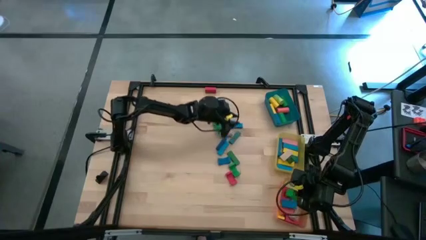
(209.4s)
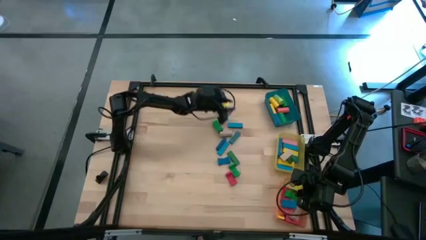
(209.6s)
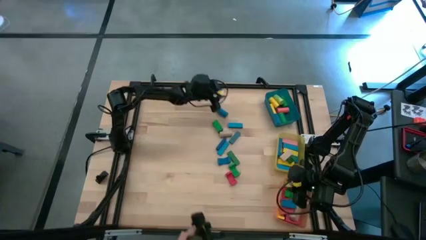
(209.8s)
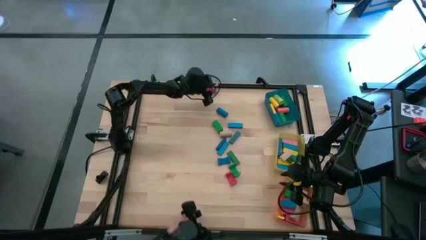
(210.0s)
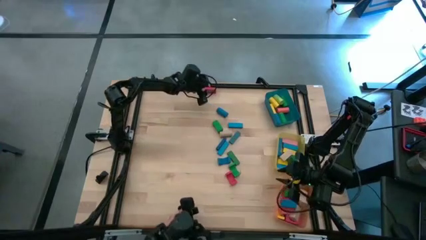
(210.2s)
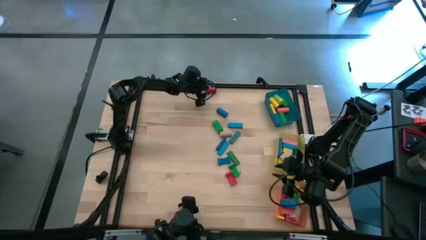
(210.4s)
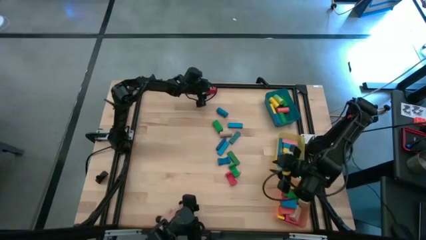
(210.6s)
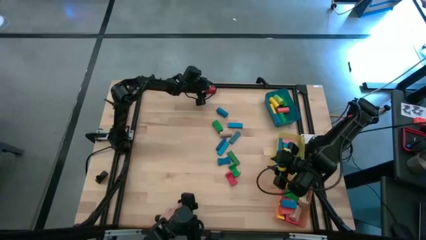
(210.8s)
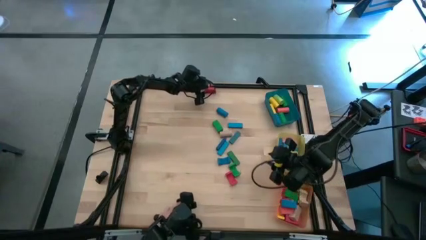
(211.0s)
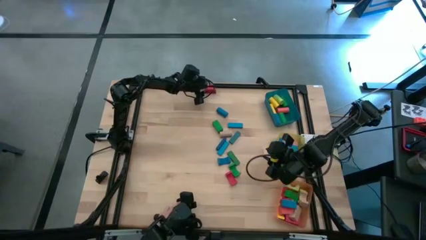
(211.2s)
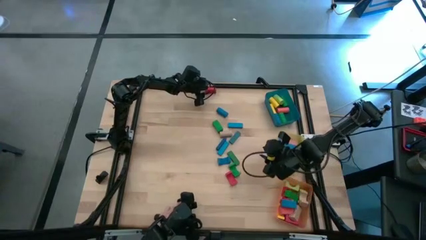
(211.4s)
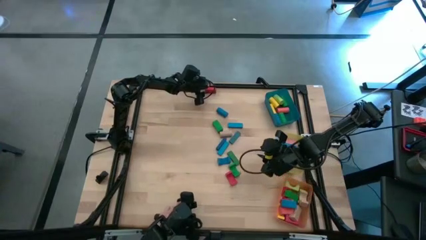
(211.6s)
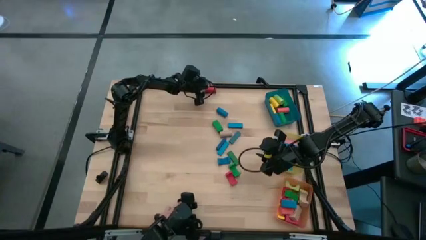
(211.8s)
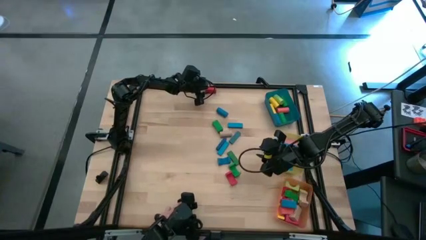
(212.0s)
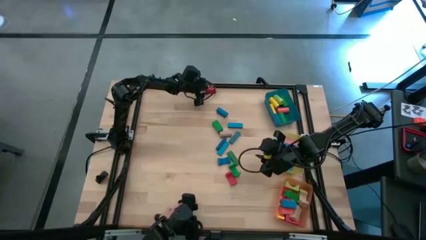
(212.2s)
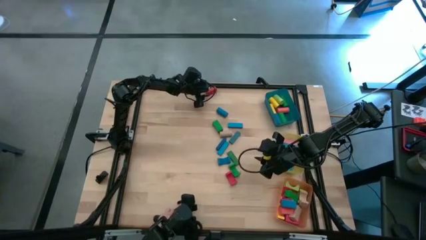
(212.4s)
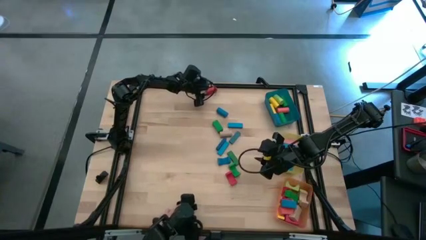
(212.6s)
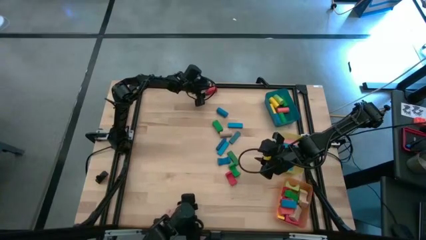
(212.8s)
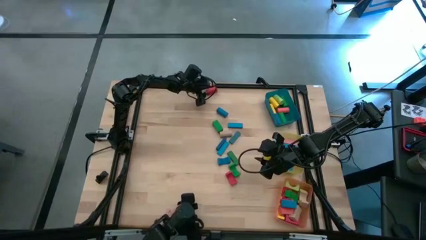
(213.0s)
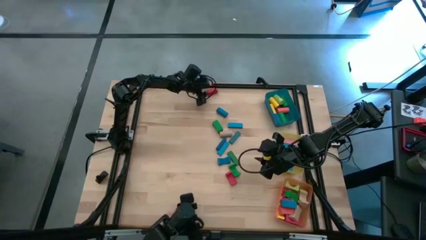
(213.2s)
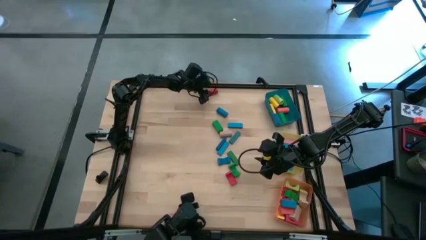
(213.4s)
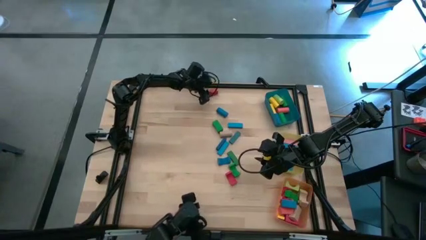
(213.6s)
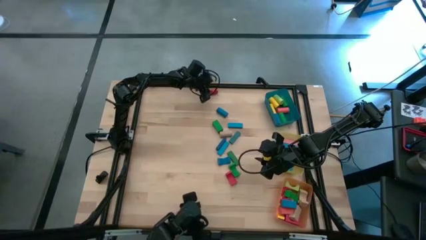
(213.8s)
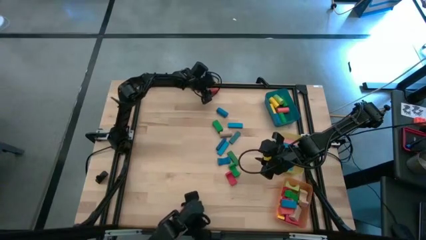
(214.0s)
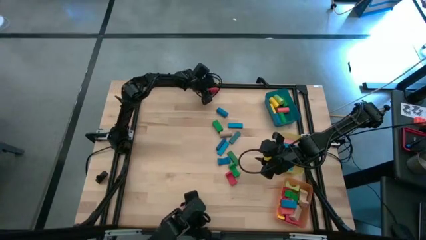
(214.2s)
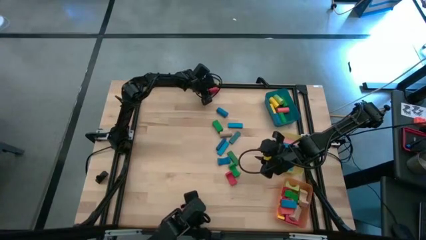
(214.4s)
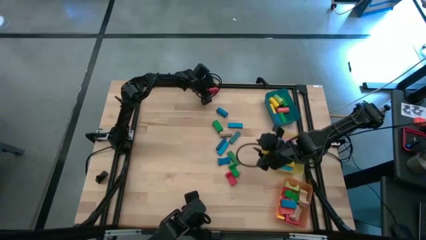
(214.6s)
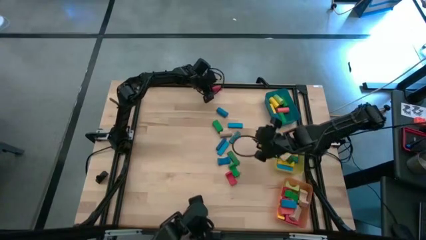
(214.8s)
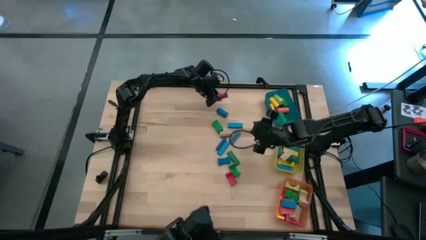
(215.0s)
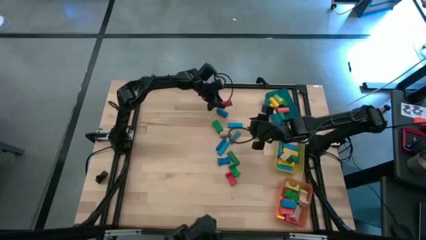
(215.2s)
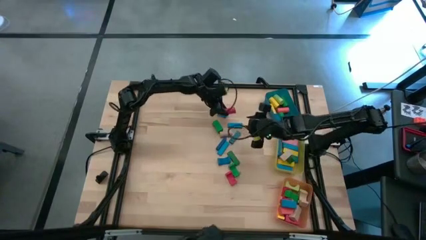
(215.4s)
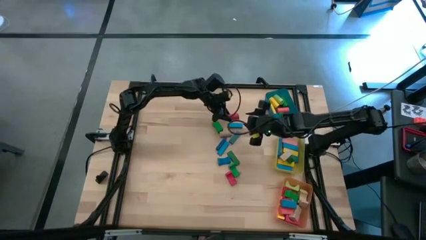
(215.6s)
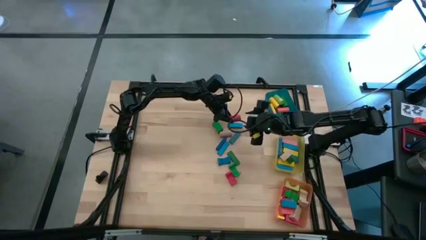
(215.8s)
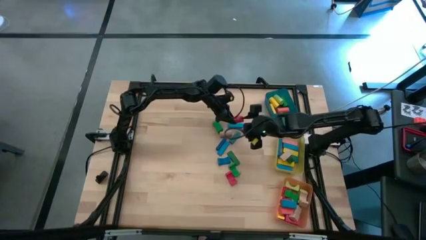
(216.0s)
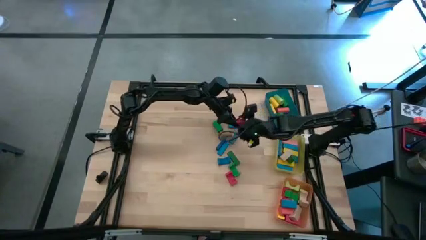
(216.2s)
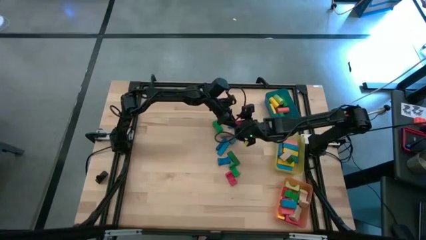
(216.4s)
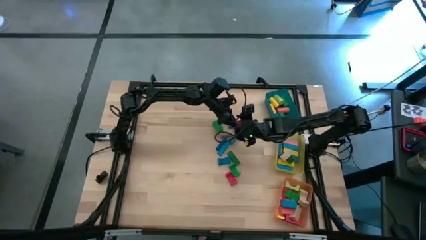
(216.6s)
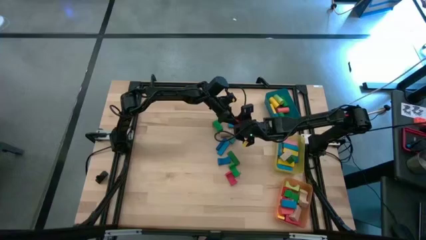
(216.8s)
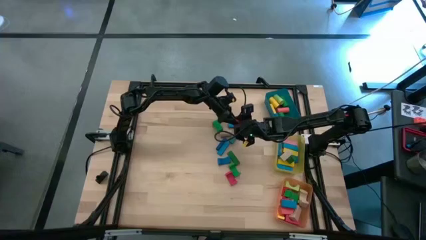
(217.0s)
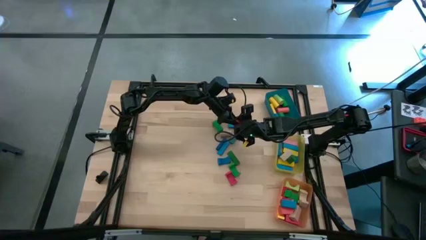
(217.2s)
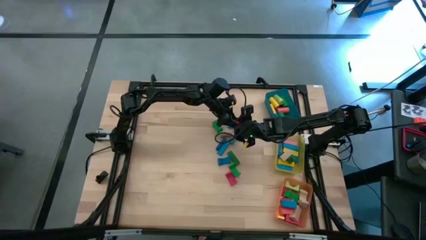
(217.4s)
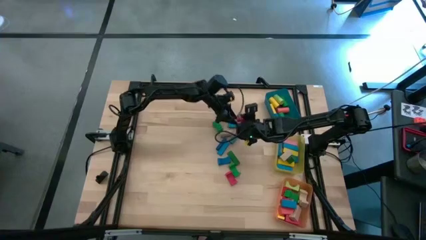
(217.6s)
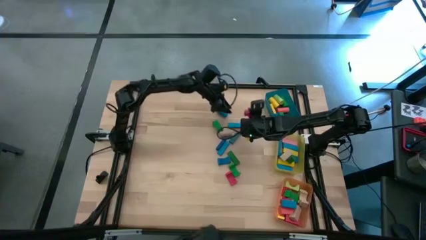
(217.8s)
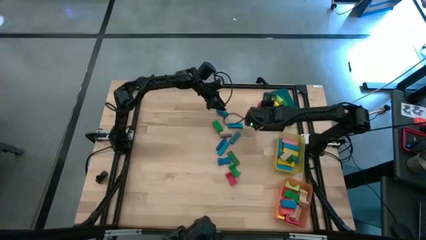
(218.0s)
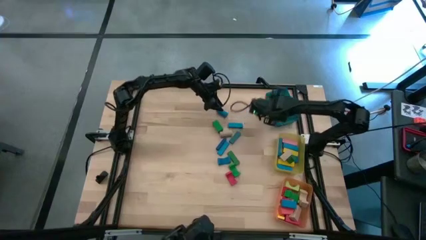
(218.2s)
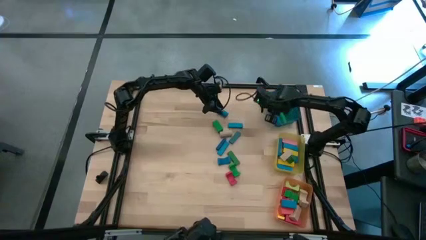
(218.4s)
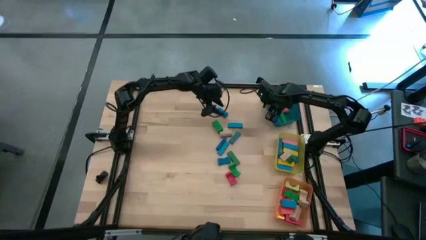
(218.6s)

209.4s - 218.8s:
Task: Sort blocks by size
Put the red cylindrical block into the blue bin

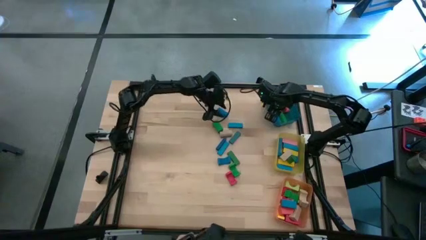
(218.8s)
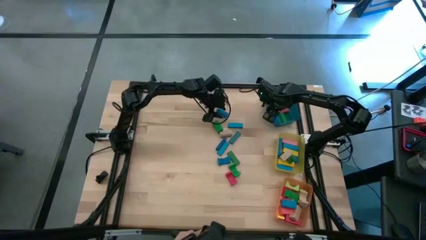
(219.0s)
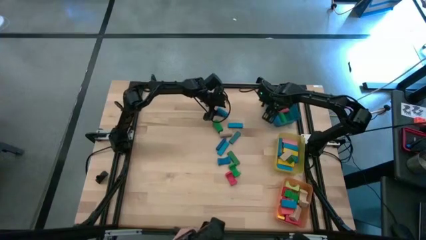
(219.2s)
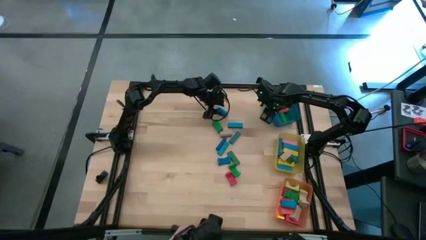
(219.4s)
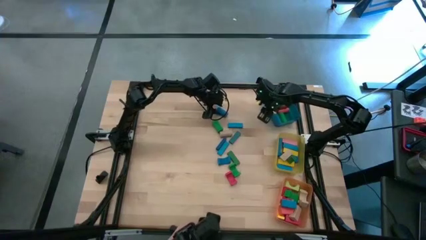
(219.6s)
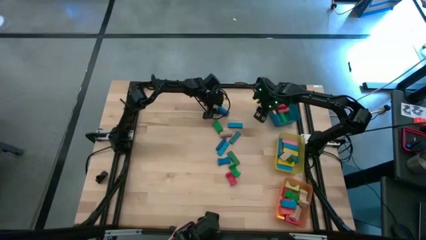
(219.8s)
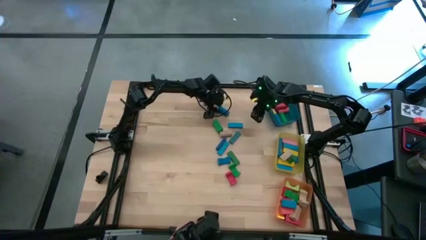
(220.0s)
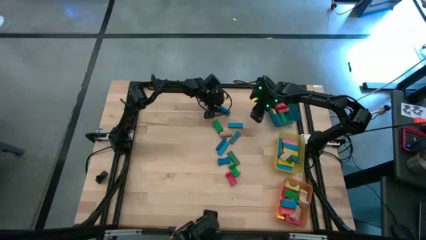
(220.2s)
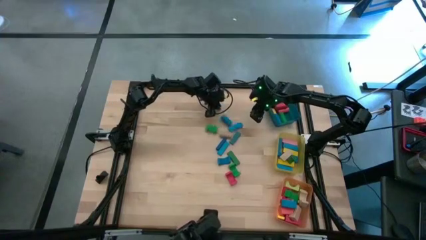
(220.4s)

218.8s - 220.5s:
Put the blue cylindrical block into the blue bin

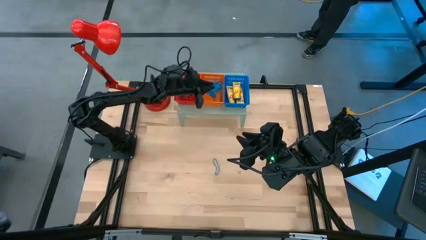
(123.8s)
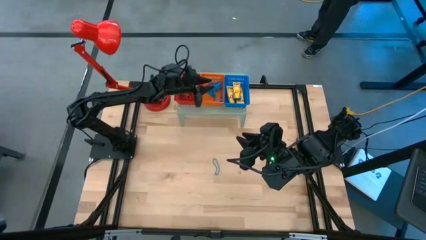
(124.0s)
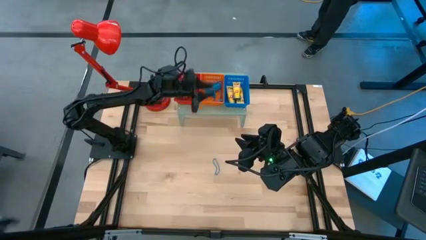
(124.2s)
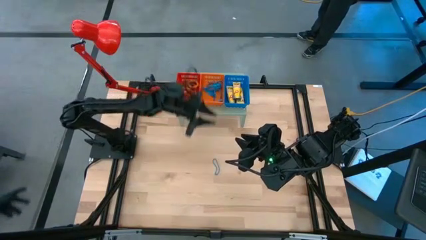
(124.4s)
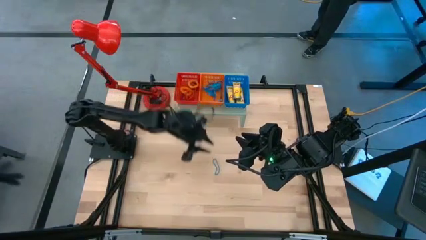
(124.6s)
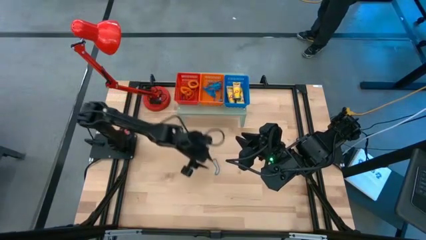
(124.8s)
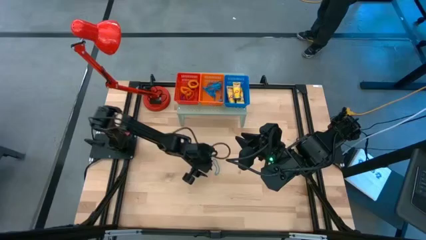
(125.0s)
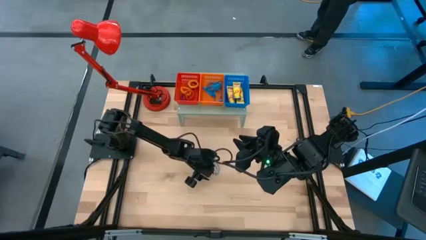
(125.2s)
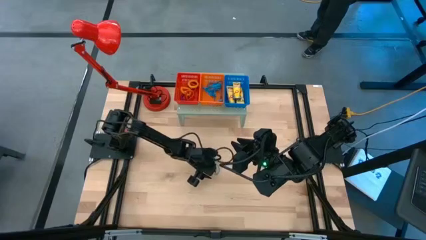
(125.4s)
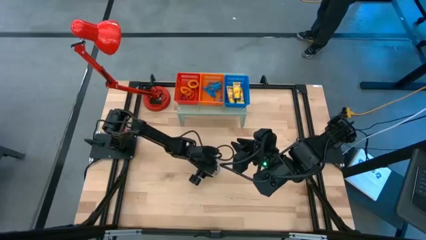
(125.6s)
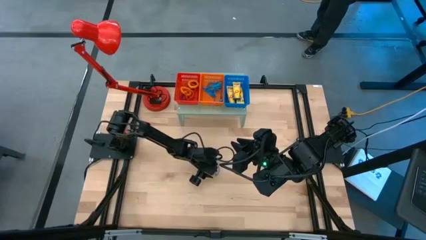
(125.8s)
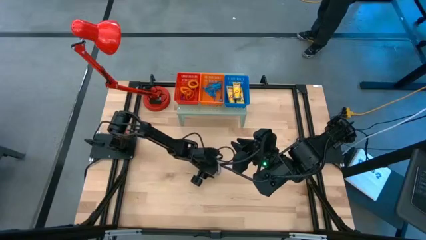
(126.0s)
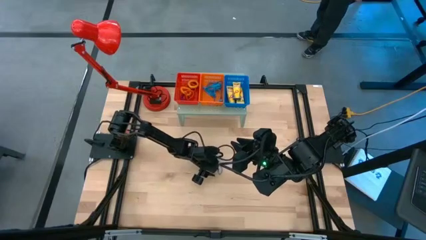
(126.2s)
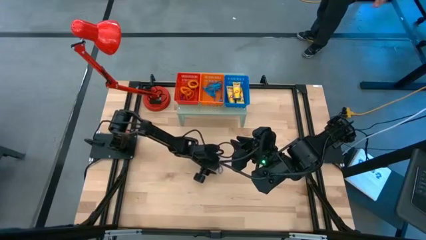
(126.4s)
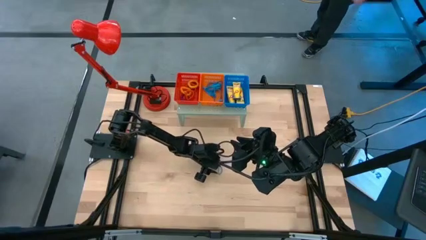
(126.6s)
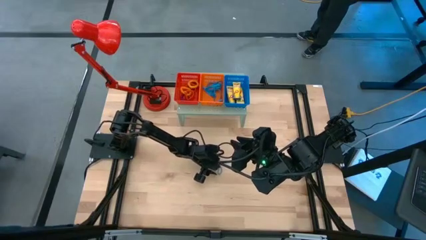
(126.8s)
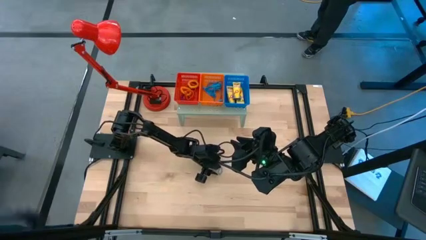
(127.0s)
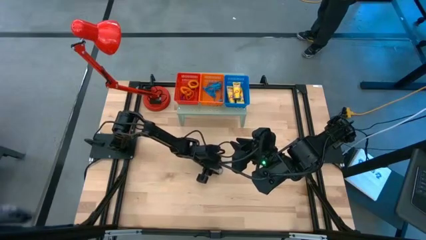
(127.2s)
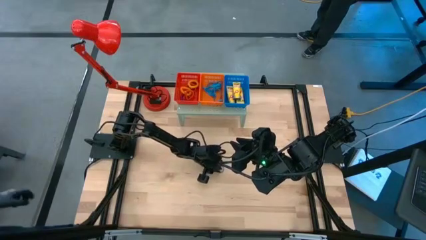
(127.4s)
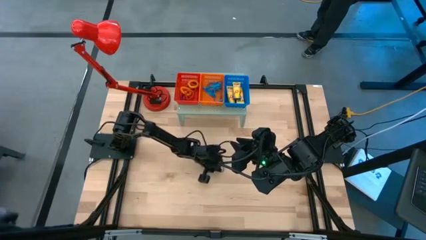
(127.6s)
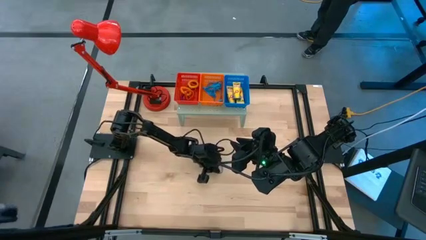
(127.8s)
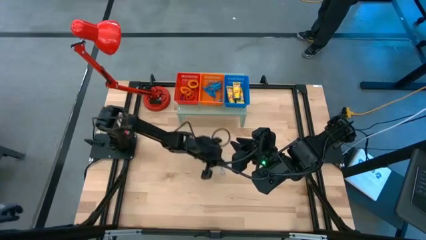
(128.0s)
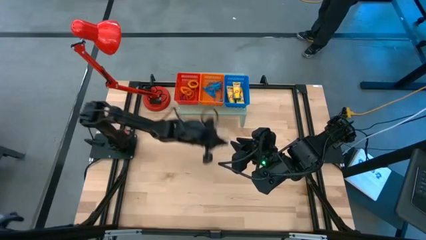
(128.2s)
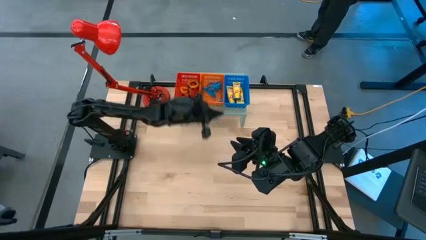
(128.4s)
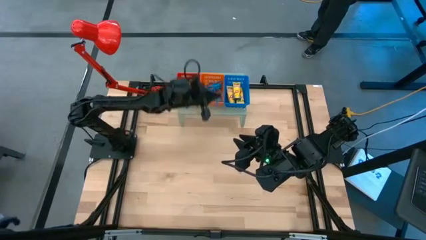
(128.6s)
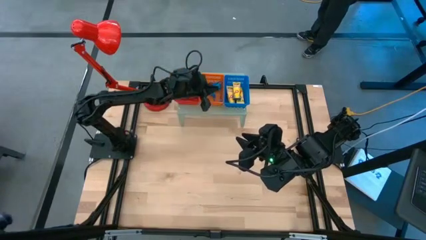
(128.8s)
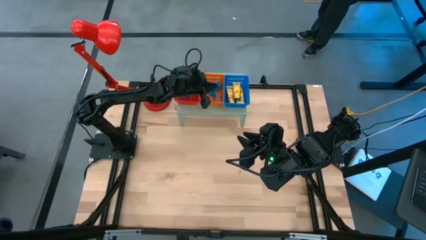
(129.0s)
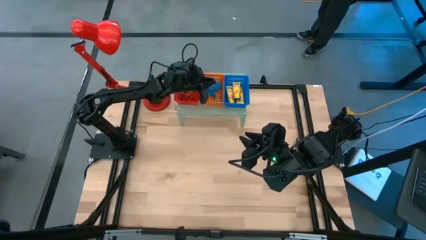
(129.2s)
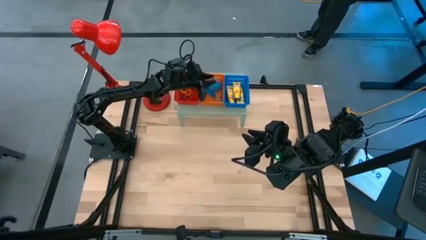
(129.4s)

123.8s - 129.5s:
Task: Pick & Place Office Desk Supplies
Put the blue rubber band into the orange bin on the shelf
